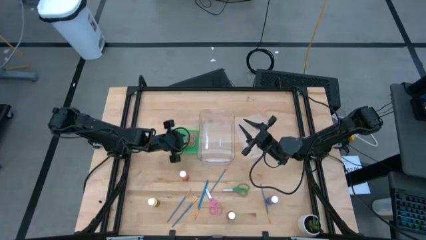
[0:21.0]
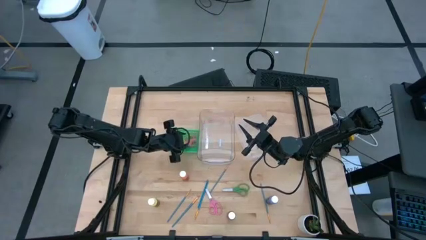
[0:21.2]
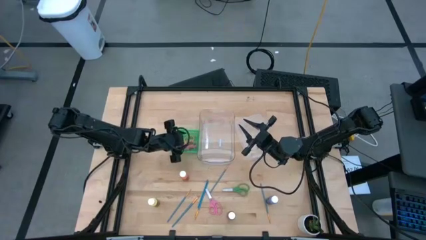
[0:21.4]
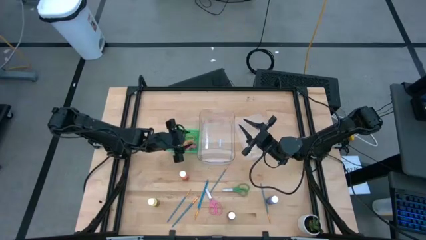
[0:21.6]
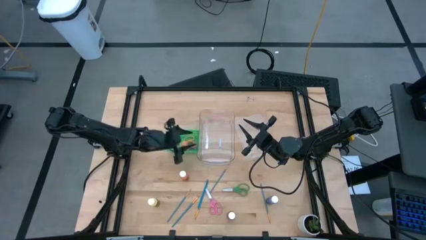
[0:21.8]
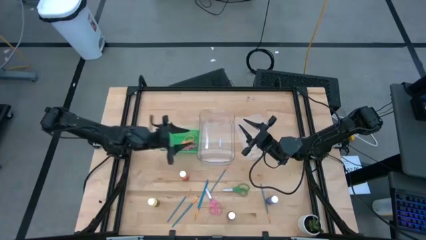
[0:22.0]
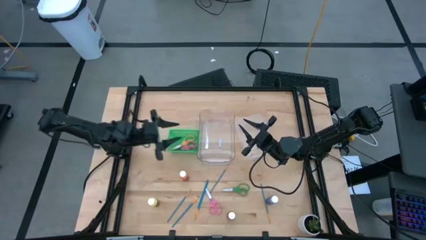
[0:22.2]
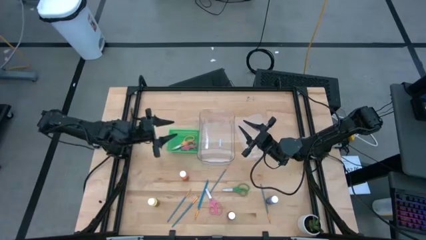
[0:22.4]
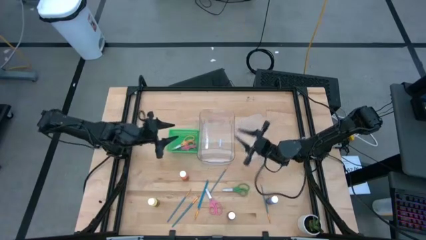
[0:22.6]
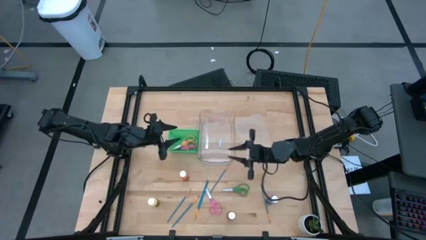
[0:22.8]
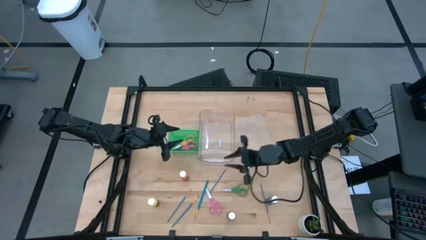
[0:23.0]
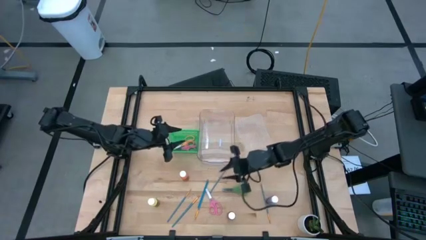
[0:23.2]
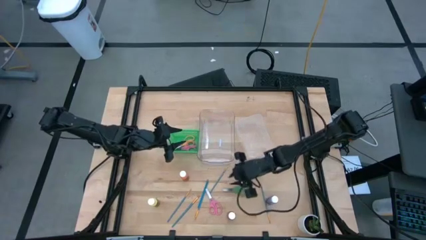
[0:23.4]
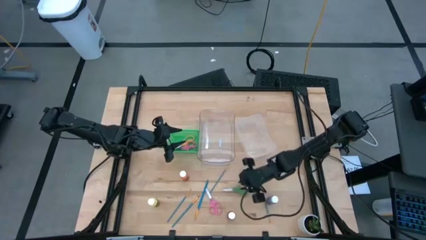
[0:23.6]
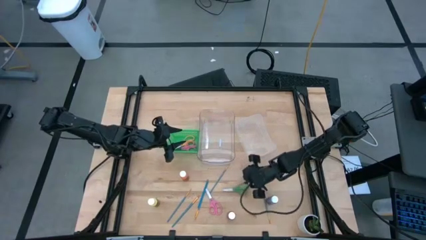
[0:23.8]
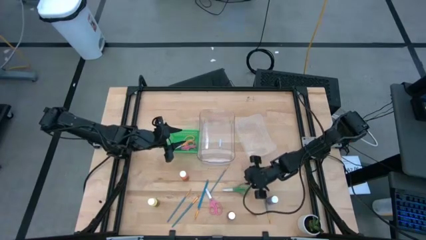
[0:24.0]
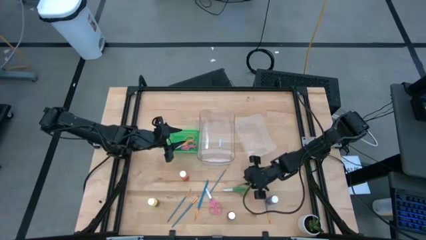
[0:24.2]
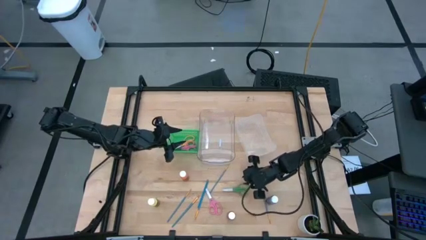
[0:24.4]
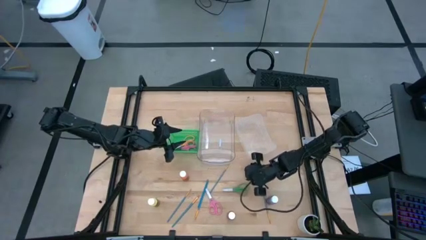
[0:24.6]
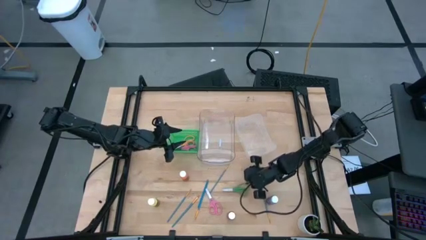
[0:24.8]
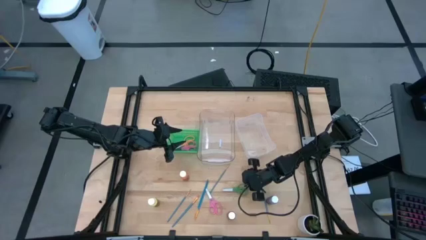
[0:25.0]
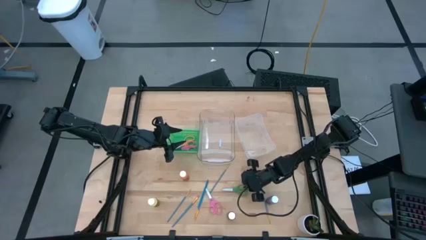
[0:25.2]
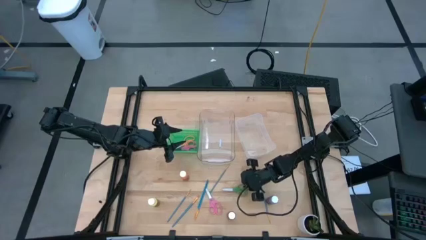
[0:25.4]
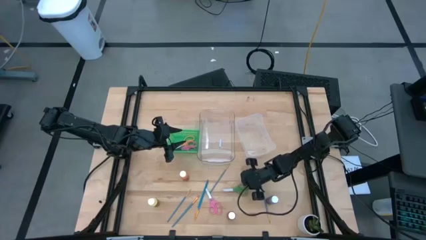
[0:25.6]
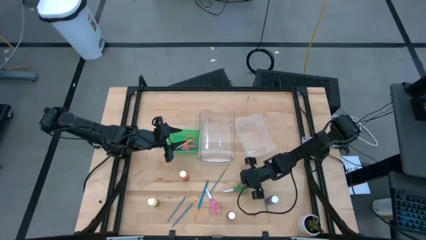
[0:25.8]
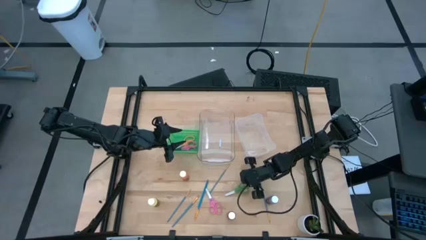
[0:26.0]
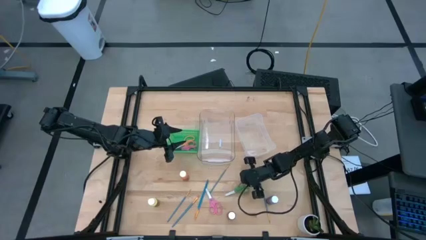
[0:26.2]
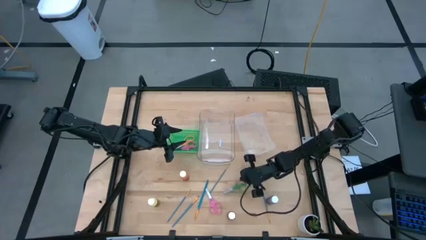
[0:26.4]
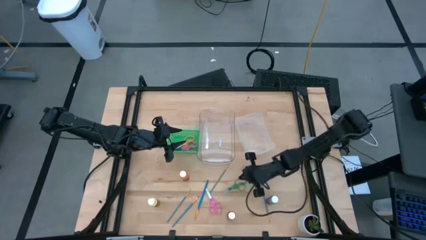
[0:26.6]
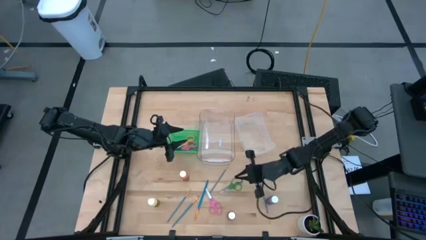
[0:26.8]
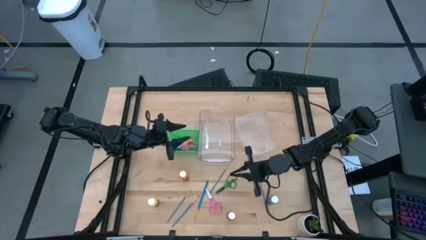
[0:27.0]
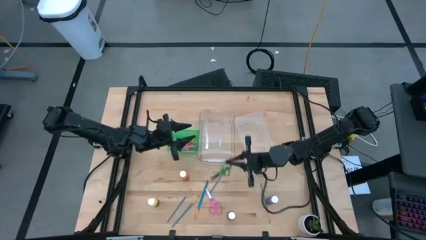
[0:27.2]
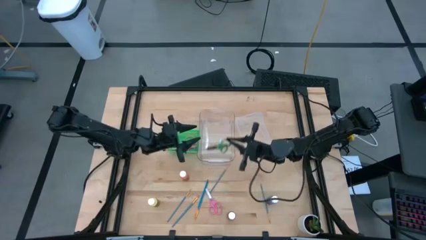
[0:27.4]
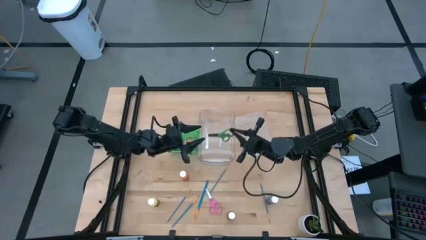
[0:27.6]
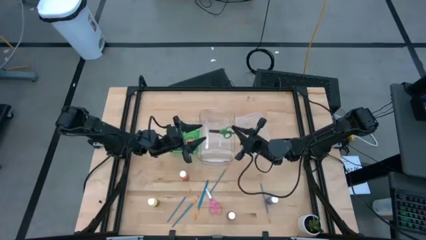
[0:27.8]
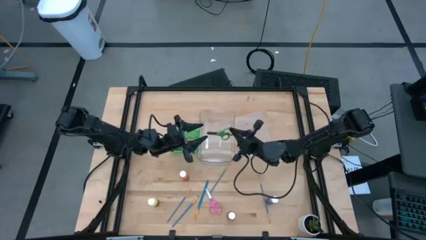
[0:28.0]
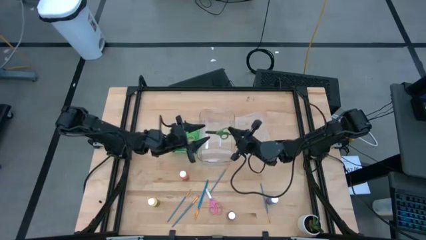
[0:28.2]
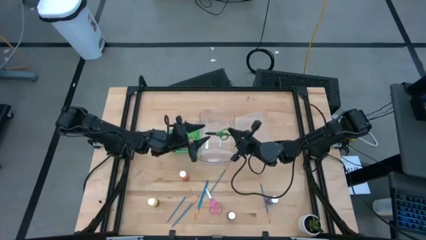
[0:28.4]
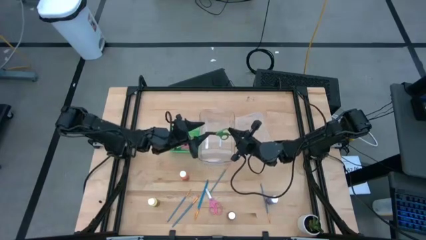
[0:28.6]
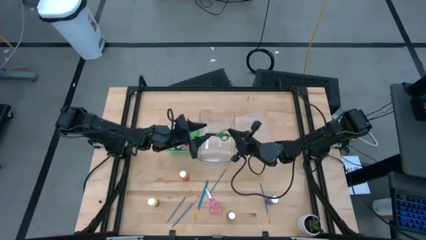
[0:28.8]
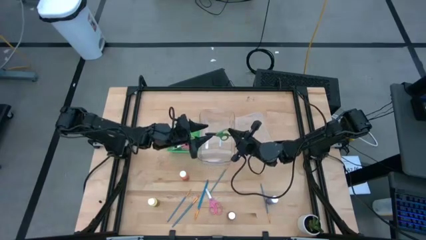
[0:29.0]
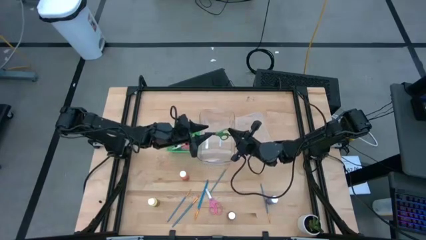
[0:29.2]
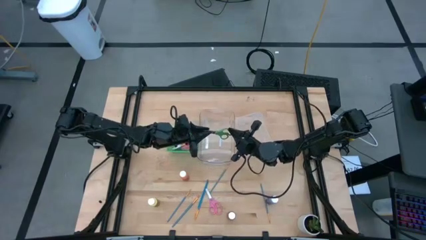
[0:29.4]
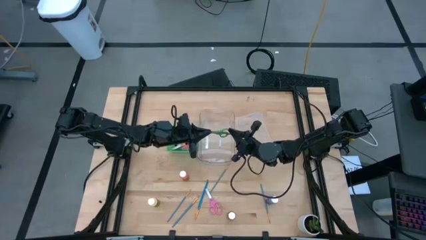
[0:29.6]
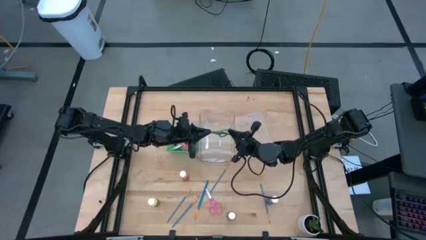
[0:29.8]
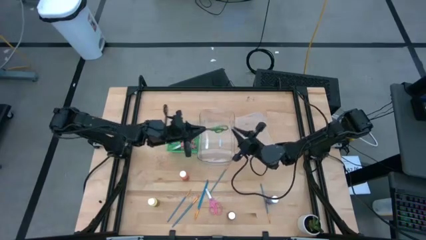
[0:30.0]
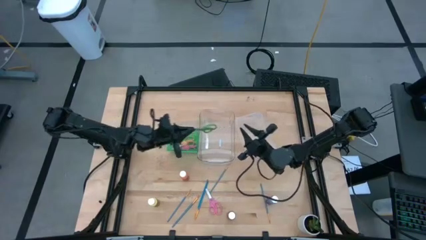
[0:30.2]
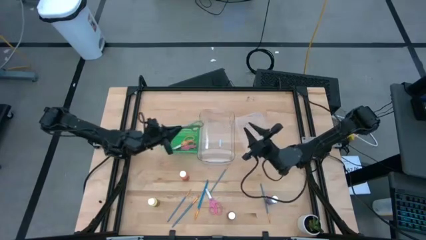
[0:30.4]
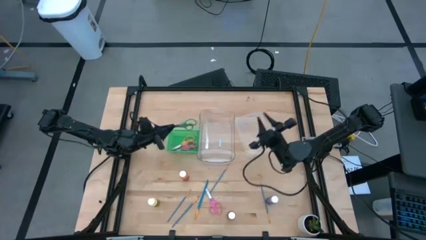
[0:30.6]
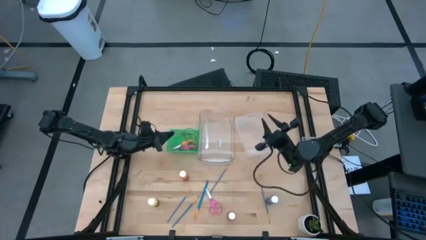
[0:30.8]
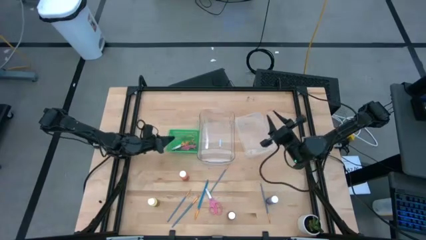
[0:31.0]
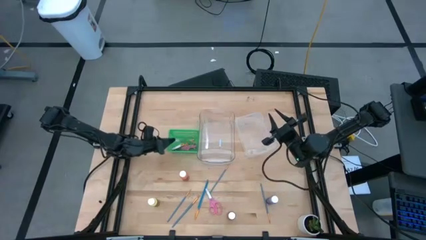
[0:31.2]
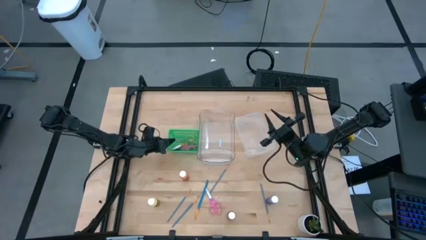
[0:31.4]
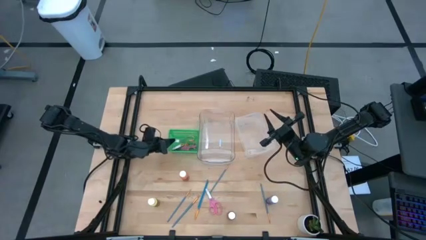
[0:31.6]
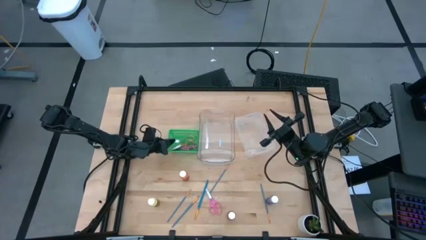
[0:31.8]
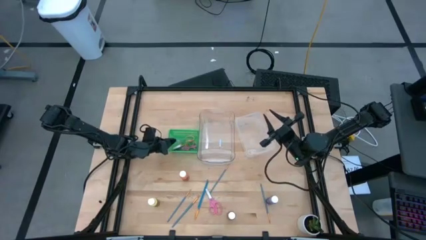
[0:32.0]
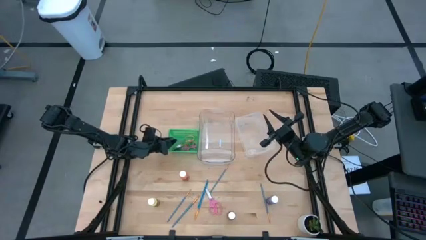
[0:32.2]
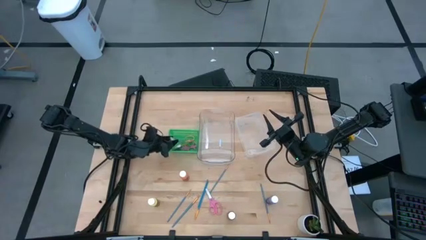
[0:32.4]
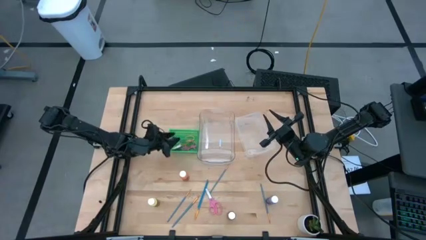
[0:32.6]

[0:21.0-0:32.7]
Task: Pick & Place Paint Supplies
Put the green scissors into the green bin

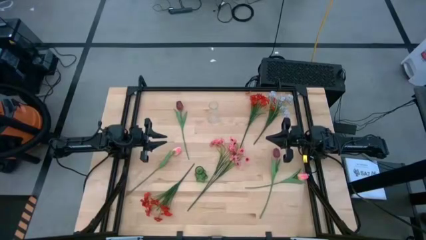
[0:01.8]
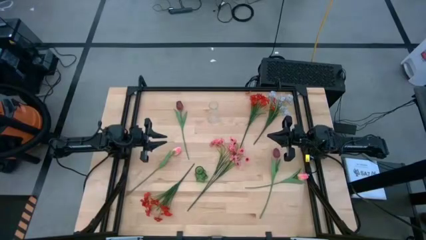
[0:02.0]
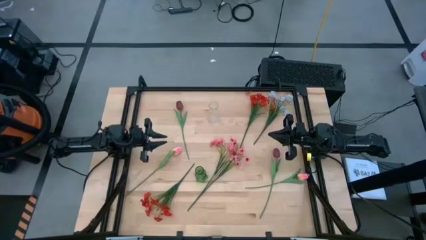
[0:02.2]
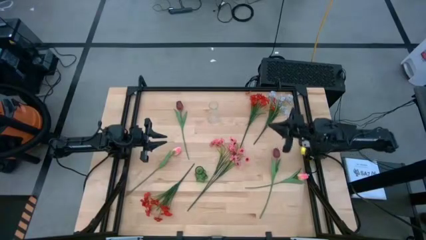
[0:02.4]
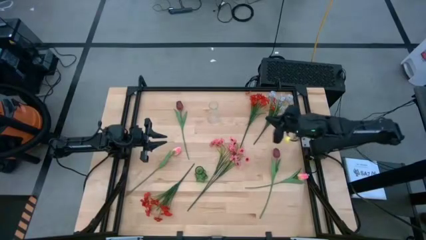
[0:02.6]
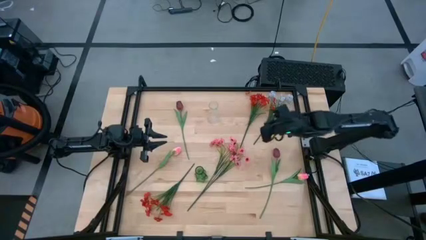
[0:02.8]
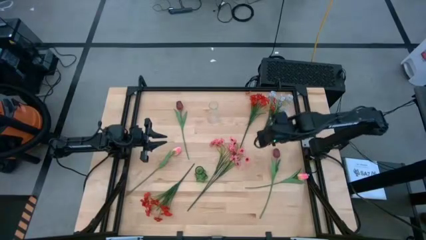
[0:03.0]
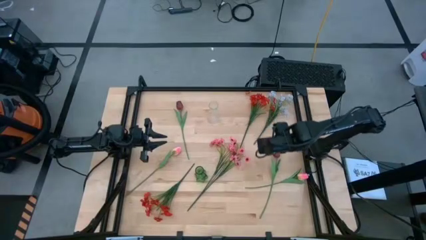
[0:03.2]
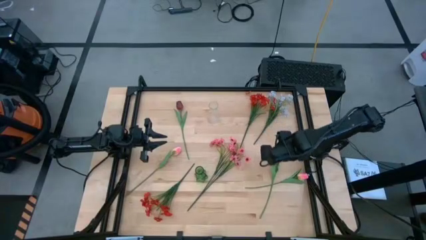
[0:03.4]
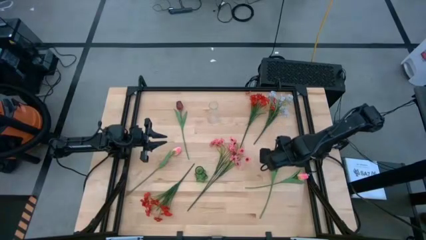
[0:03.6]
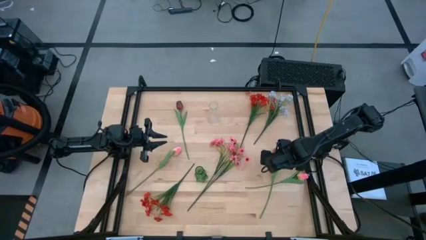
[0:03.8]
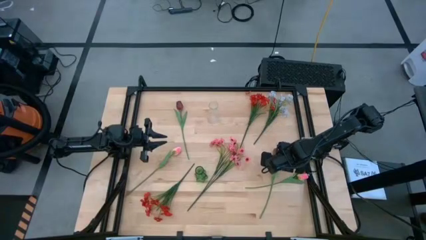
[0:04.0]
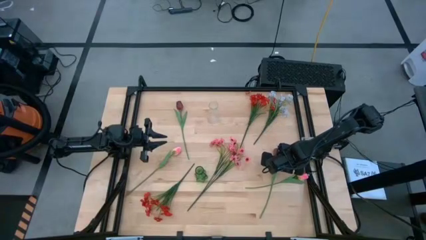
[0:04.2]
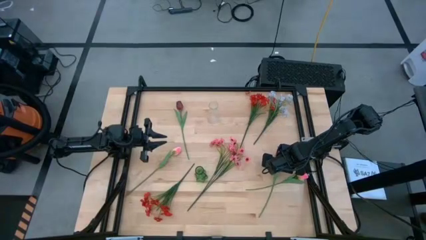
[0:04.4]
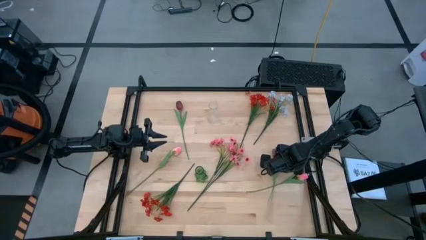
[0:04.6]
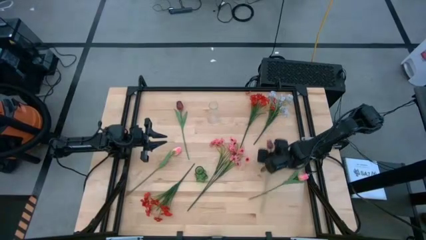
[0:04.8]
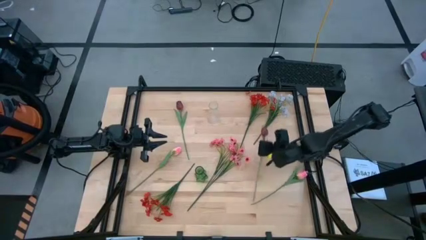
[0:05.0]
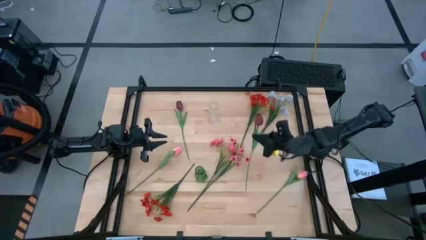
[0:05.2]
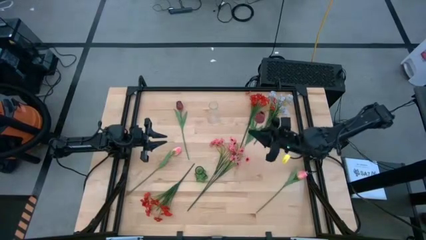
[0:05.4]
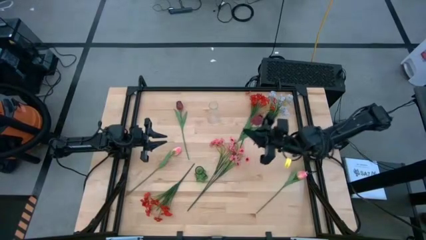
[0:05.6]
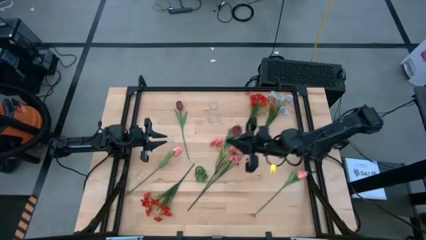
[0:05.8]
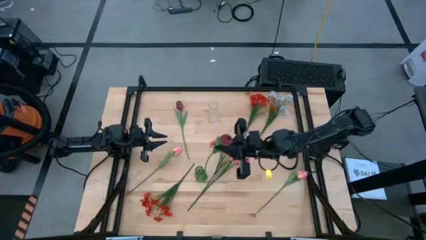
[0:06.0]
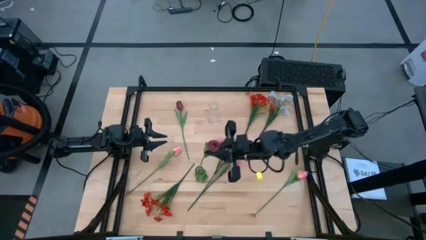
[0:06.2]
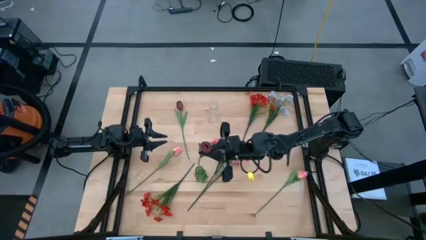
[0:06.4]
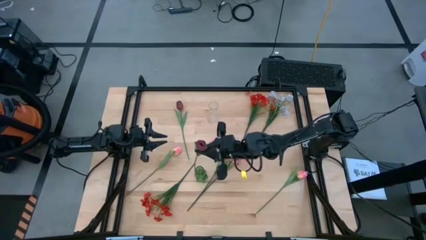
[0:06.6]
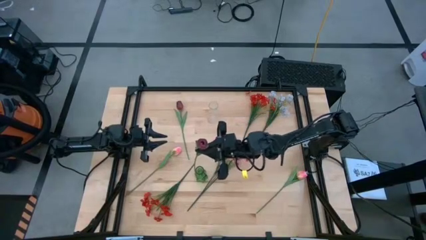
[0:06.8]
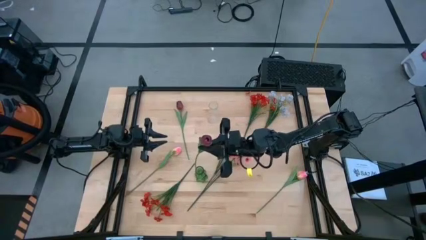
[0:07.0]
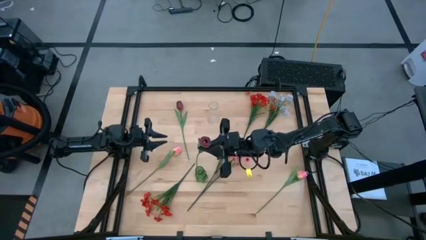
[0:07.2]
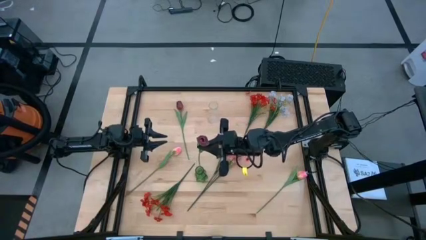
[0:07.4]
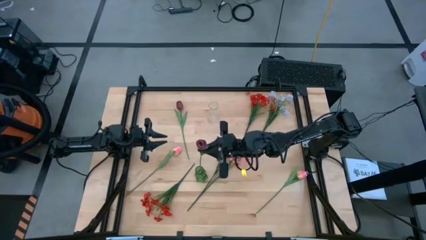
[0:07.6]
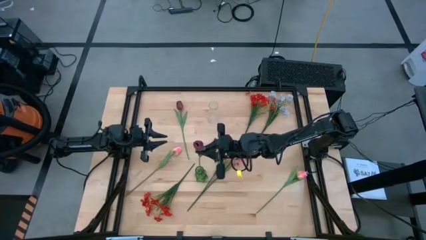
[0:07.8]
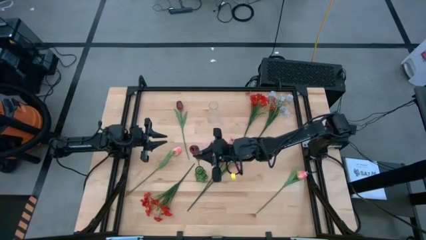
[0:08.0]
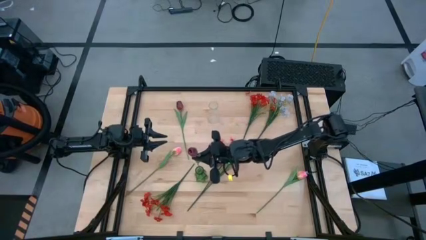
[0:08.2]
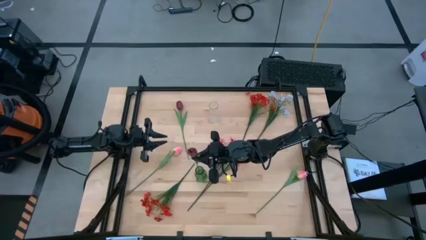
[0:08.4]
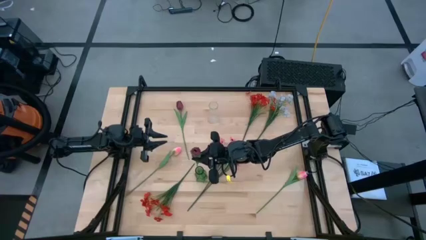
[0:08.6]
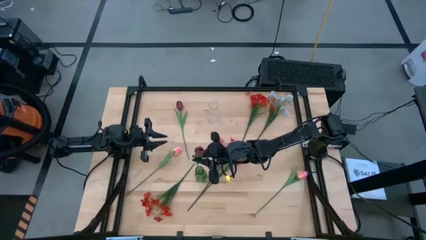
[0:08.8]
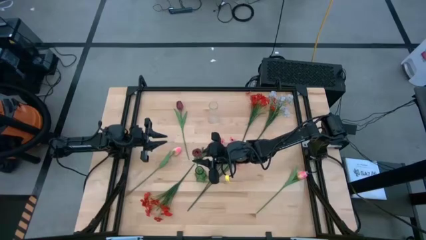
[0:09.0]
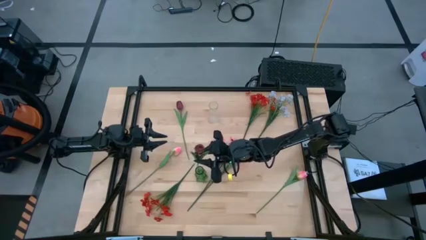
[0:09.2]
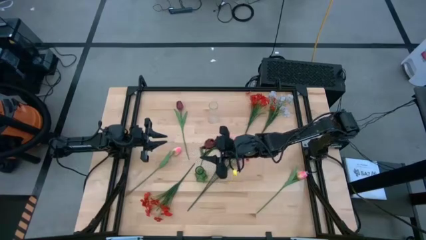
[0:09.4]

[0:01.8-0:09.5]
Task: Sort flowers into vase by color
Put the bottom red flower into the green flower vase
